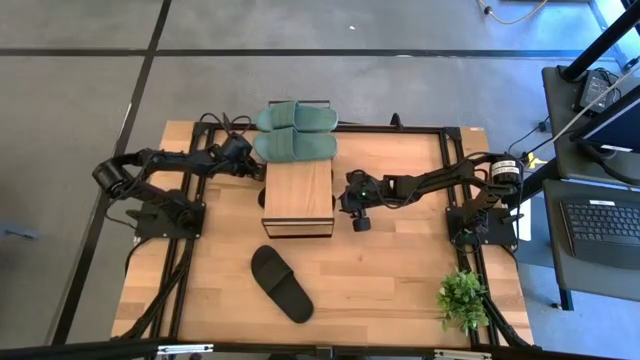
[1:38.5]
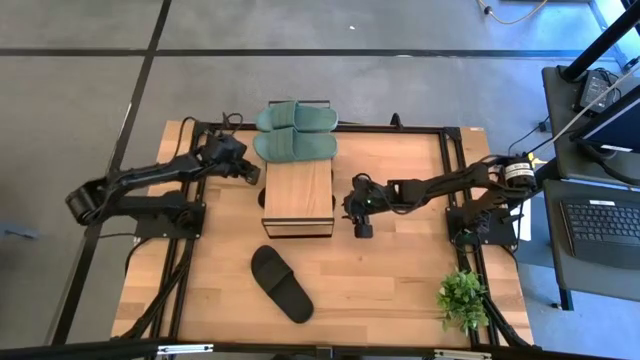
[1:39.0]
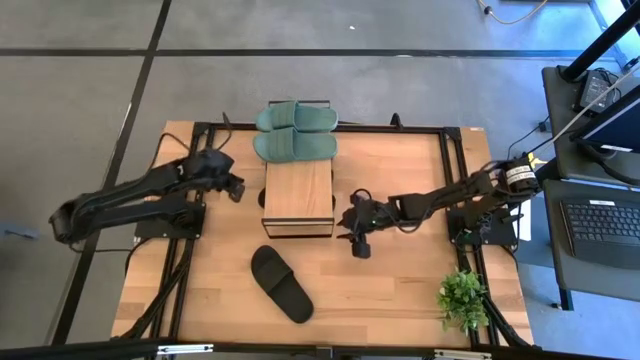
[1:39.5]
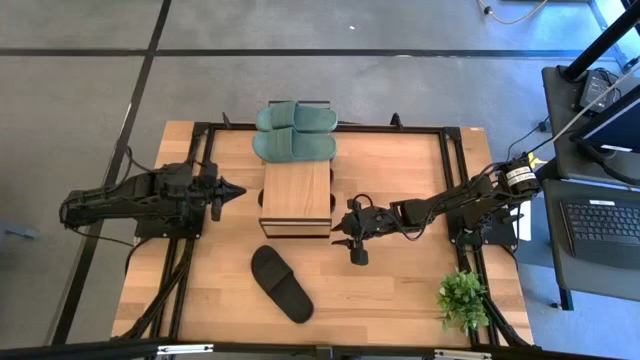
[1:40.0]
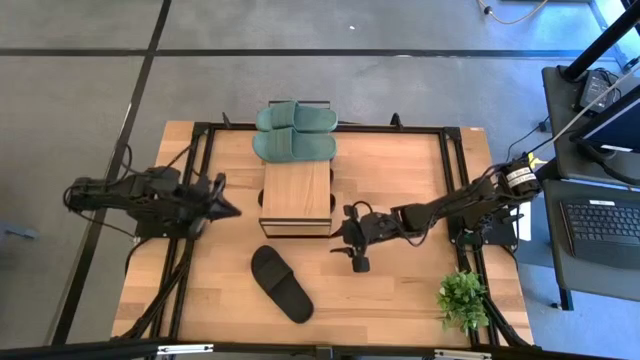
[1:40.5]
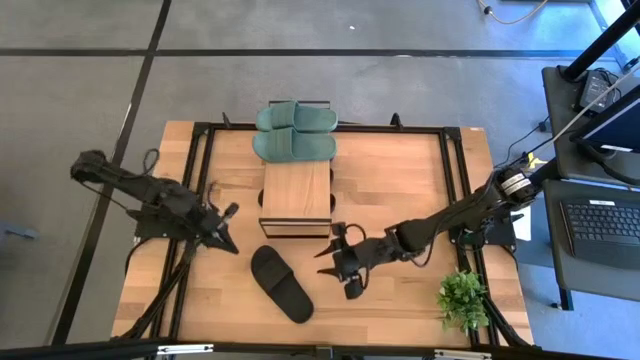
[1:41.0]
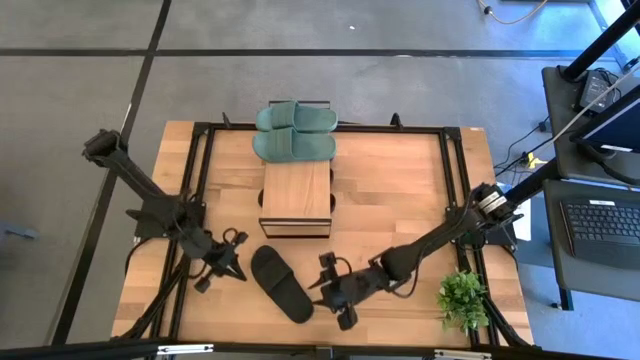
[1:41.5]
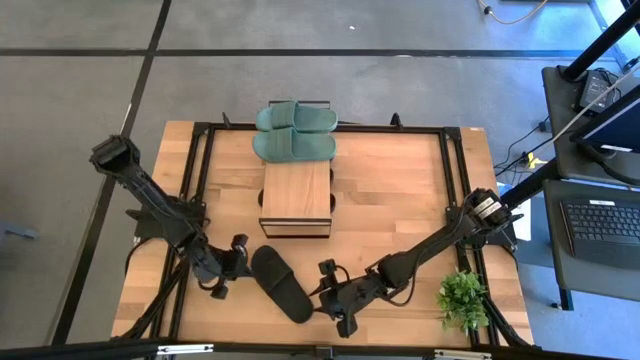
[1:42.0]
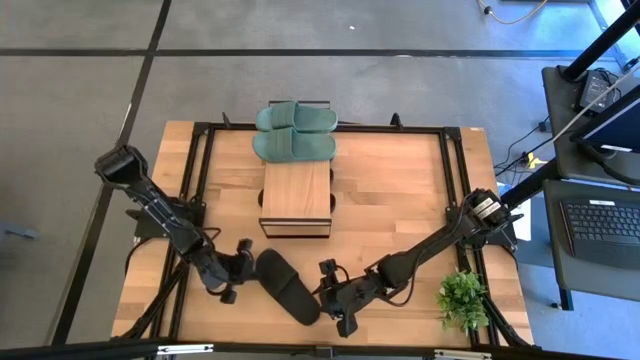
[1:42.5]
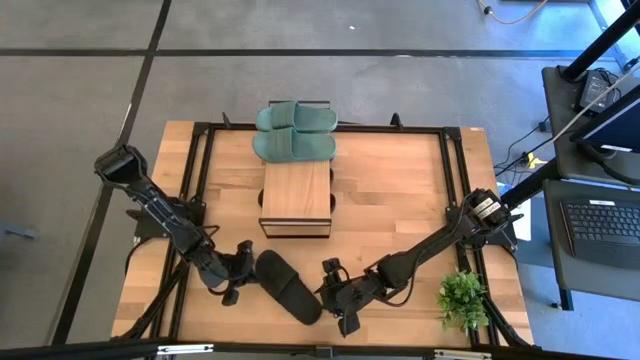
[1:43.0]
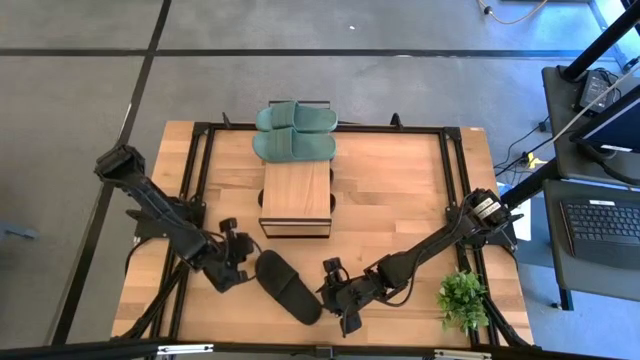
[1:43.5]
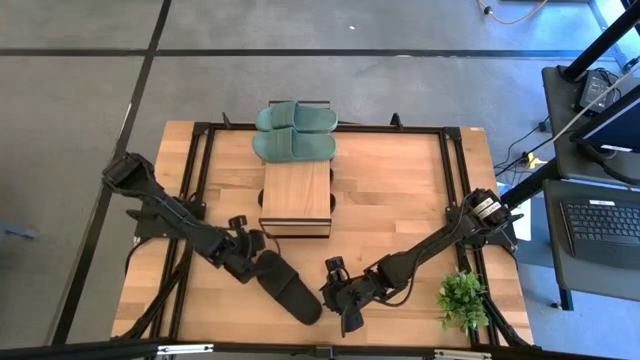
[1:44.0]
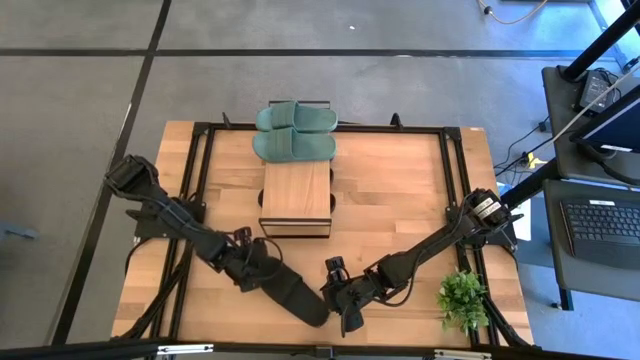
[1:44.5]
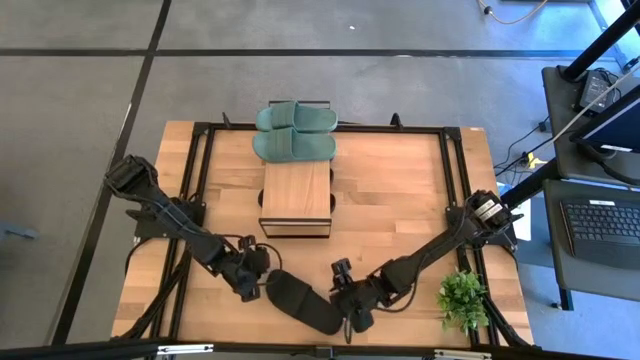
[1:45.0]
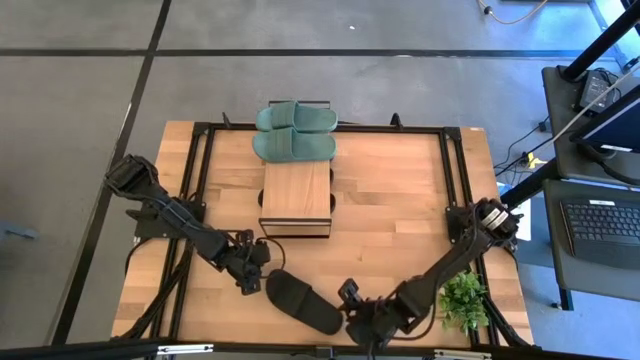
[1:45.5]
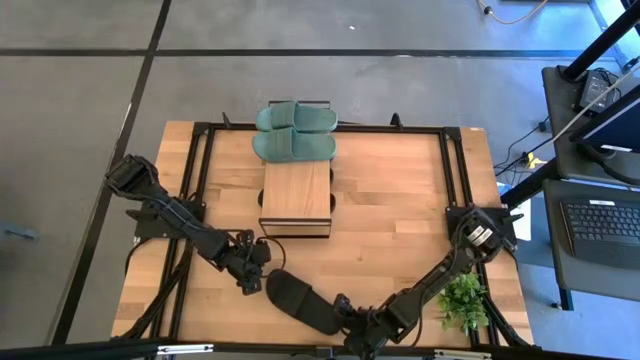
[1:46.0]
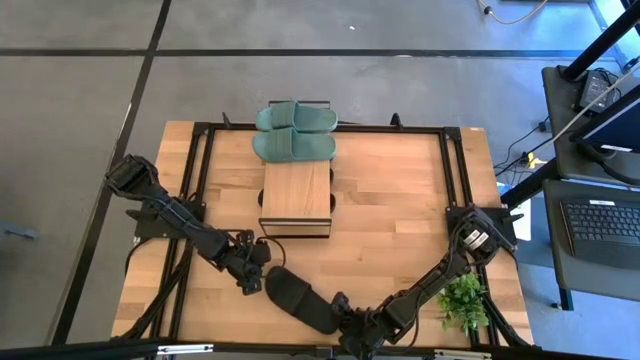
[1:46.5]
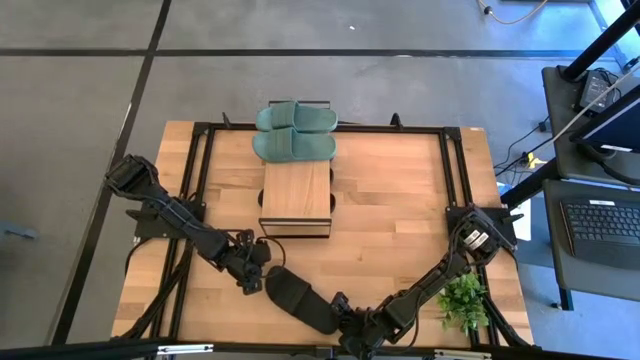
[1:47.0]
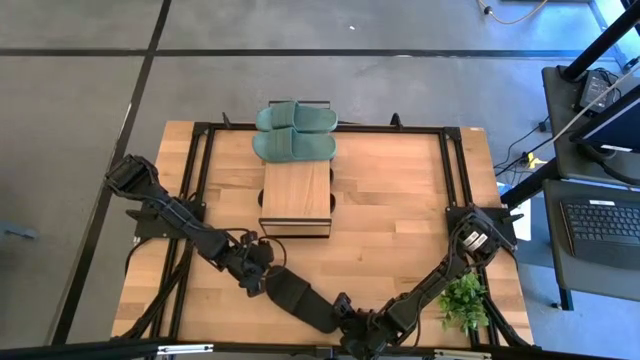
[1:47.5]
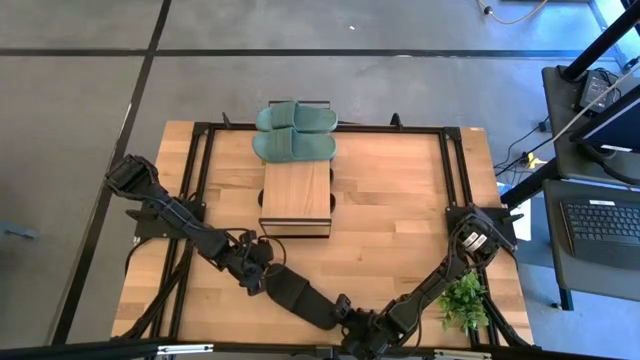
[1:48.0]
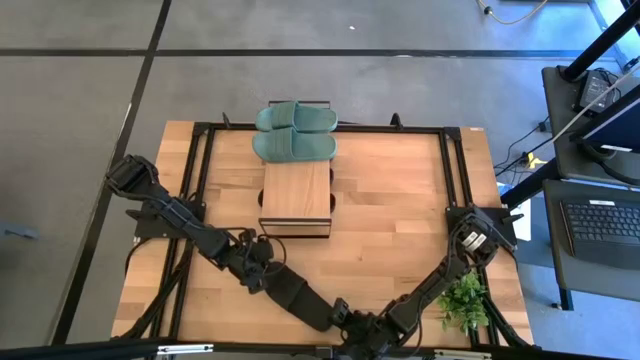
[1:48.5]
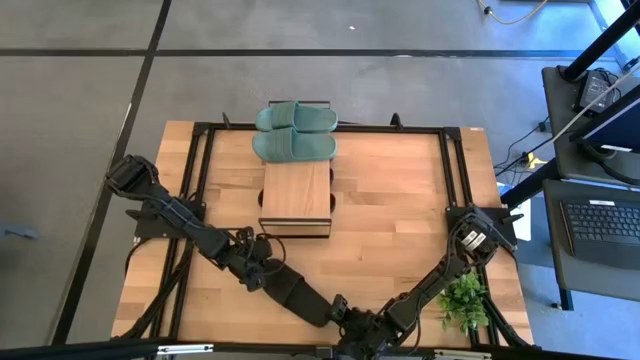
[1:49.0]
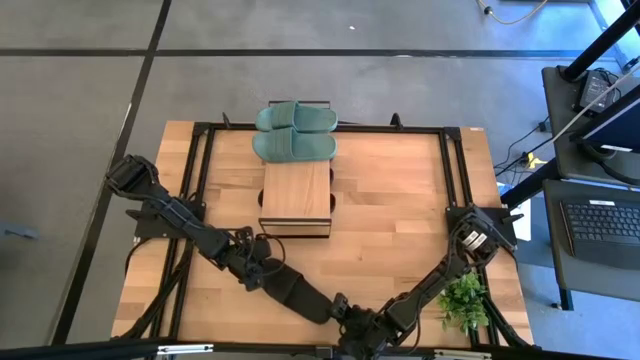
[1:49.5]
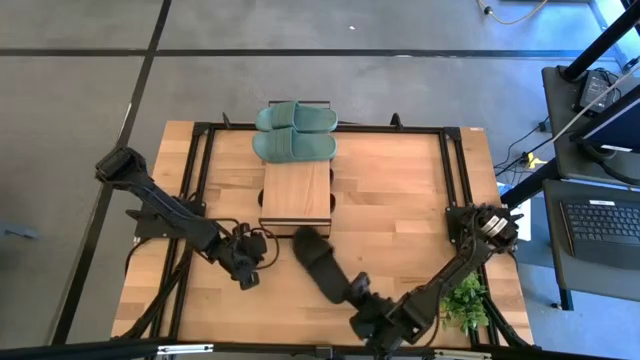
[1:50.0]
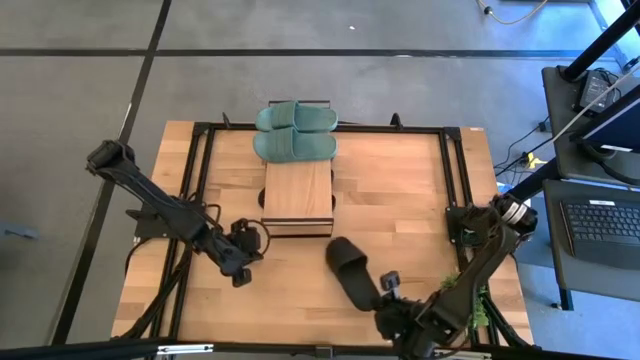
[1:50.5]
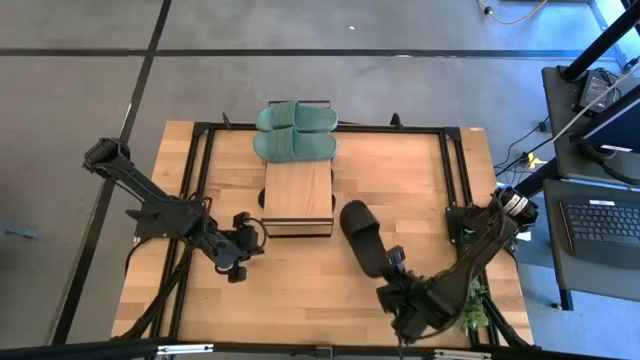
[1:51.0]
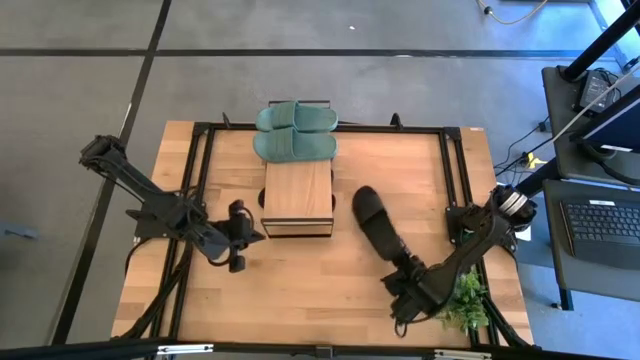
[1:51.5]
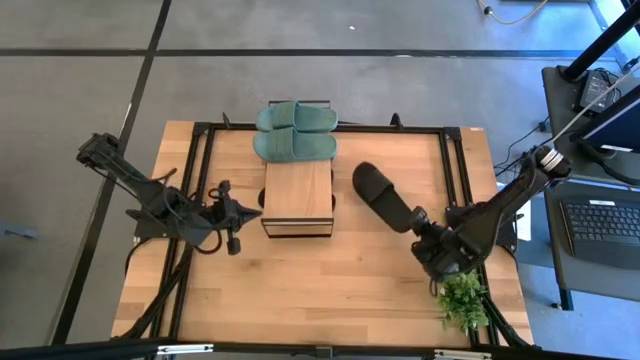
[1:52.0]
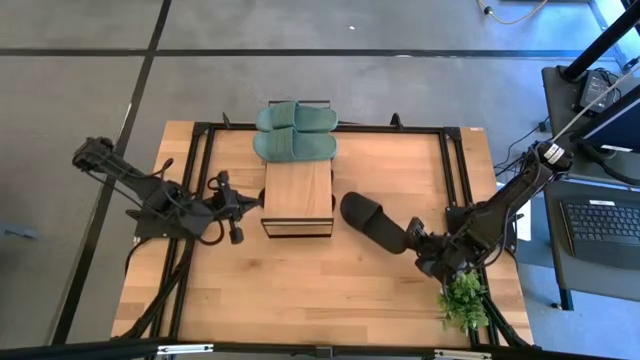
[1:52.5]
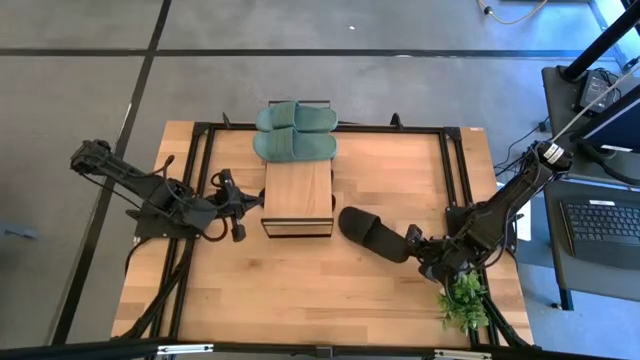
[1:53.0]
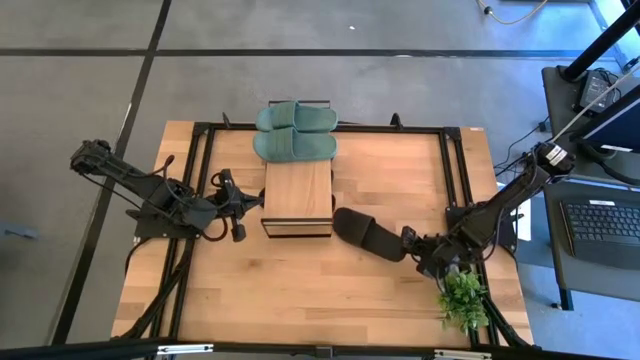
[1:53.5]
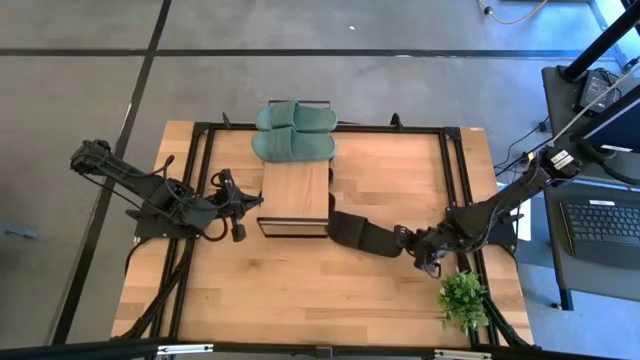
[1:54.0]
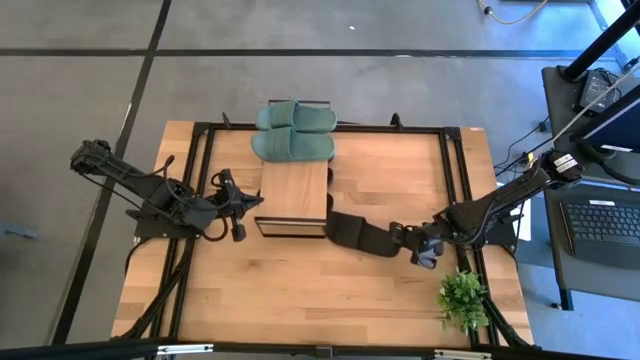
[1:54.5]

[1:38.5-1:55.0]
Task: Pick and place slides into the shelf
Put the black slide under the shelf

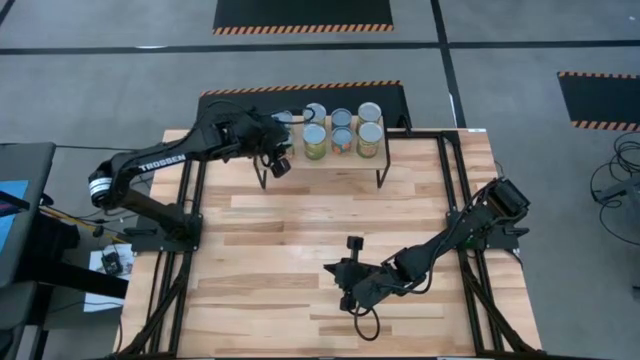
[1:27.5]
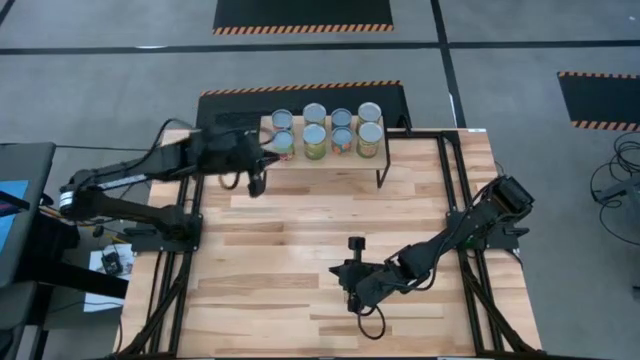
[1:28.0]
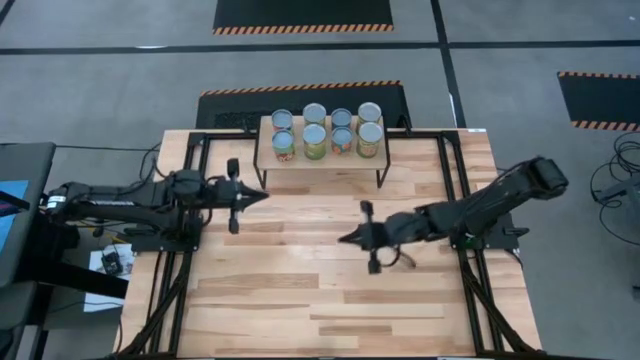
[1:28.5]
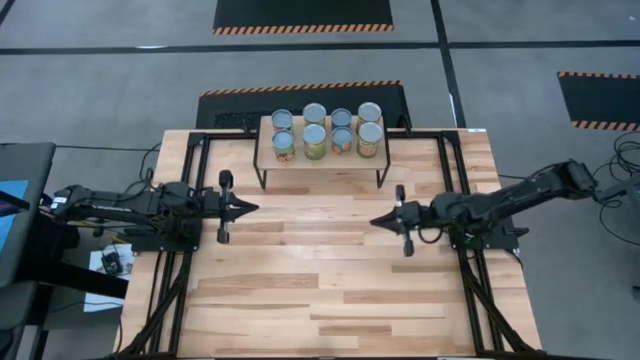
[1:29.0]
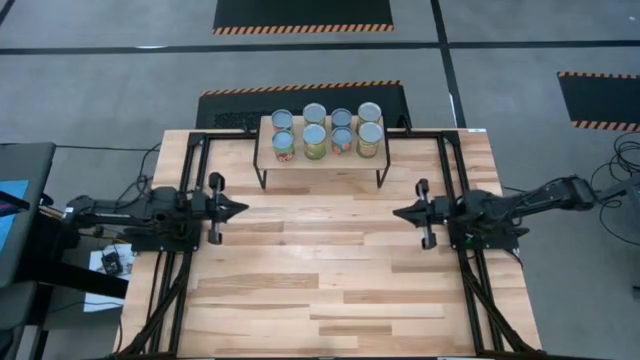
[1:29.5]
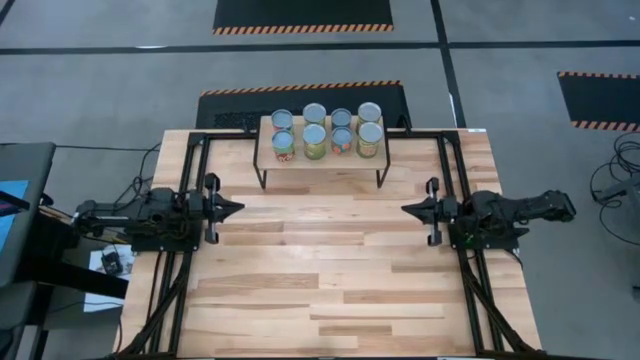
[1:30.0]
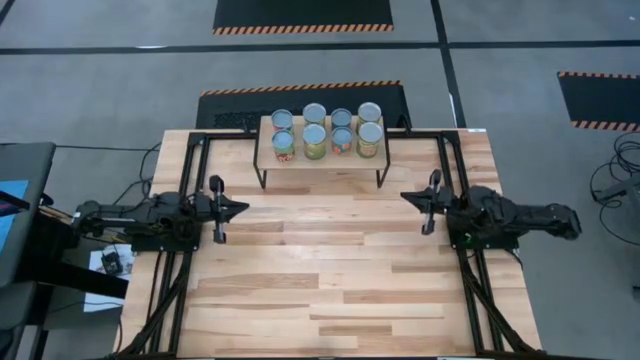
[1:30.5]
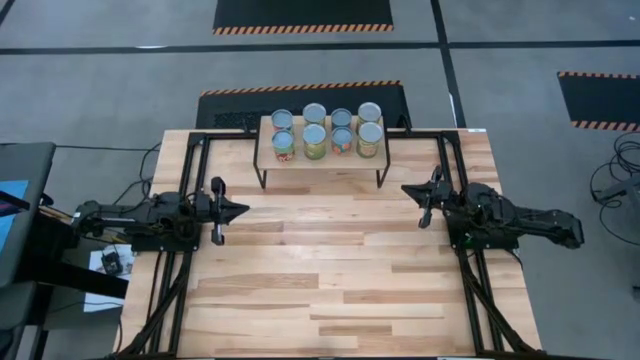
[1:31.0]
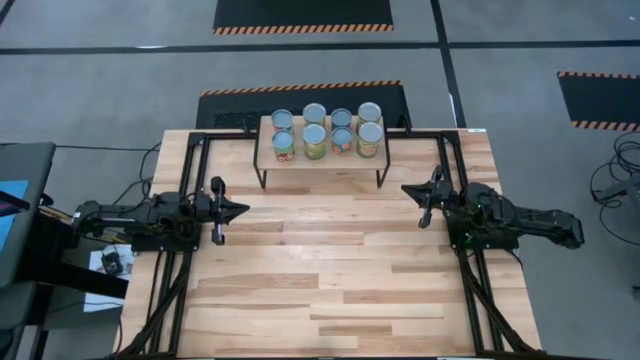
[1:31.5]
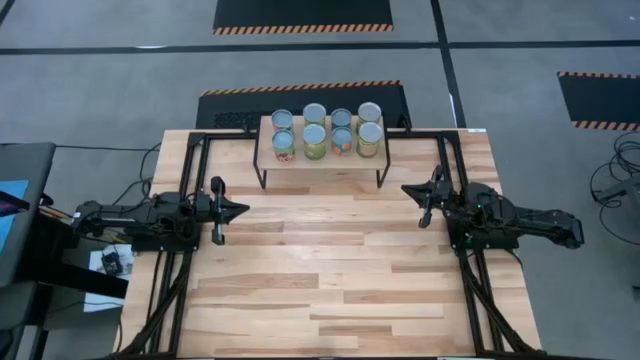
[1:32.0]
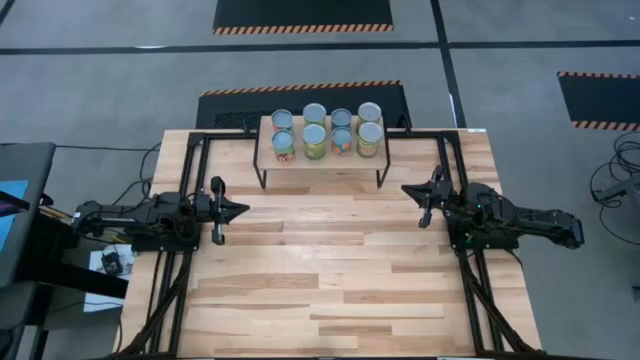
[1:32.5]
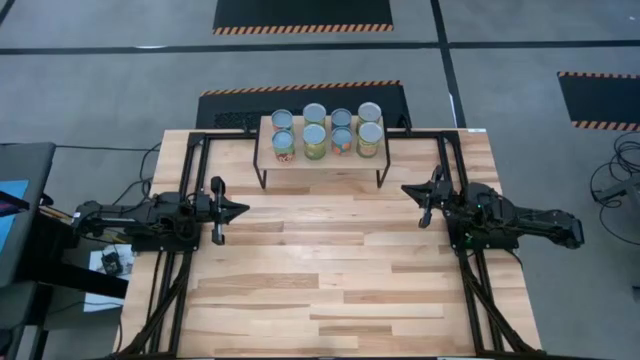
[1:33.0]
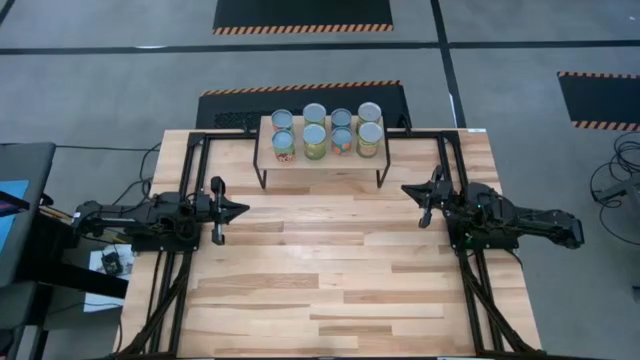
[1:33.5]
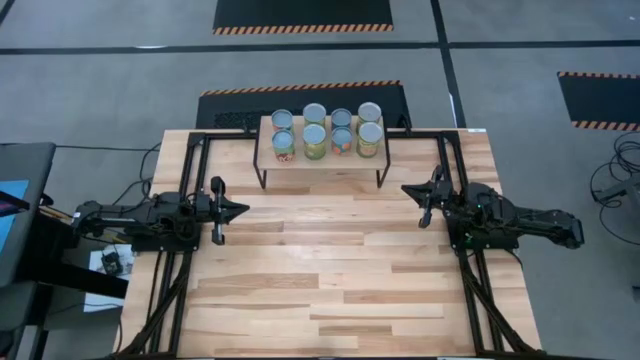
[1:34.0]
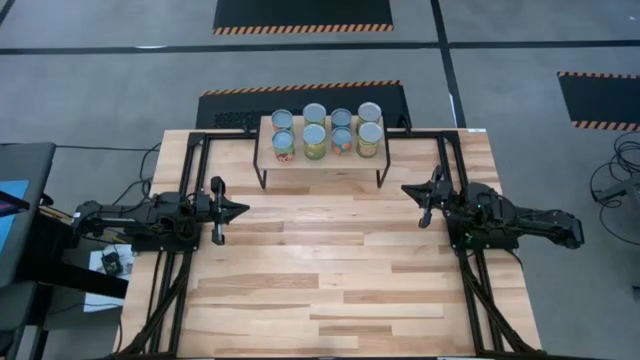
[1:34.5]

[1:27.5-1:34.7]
Task: Pick and place cans onto a shelf
Return to Home Position
